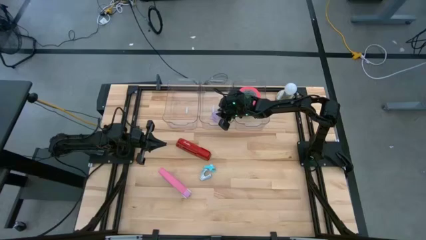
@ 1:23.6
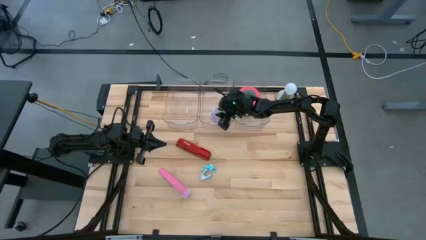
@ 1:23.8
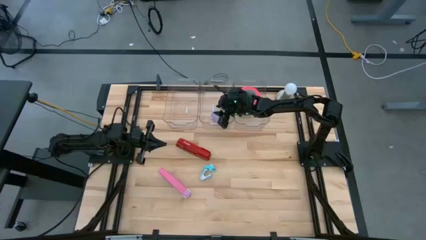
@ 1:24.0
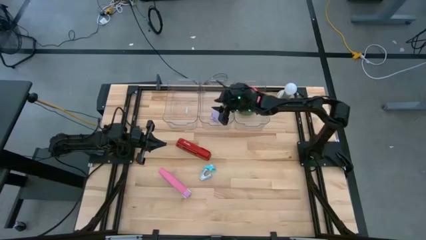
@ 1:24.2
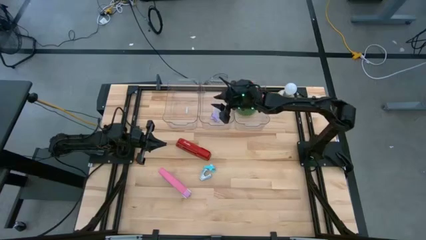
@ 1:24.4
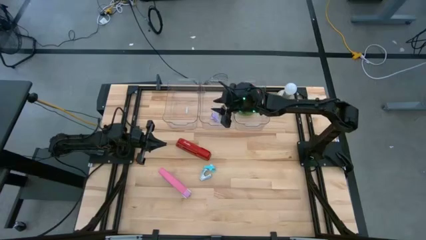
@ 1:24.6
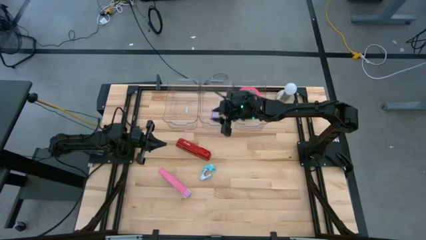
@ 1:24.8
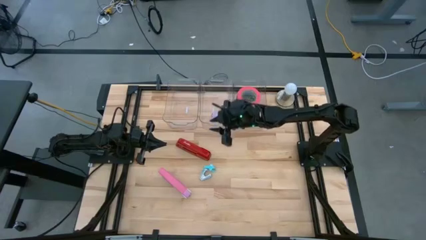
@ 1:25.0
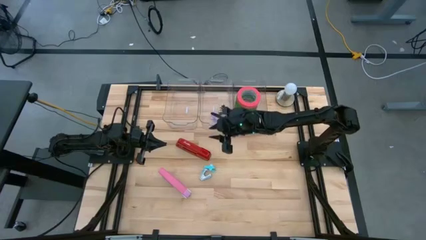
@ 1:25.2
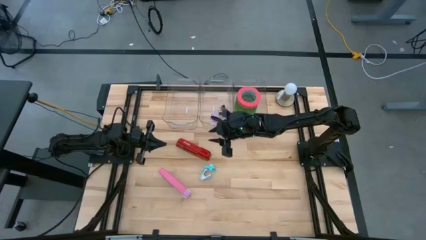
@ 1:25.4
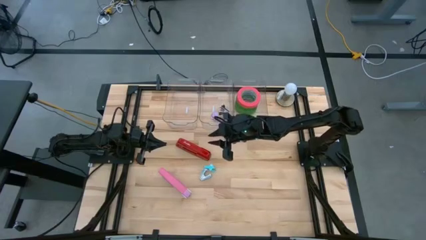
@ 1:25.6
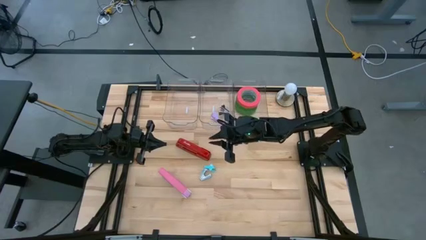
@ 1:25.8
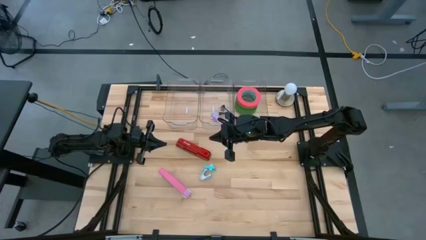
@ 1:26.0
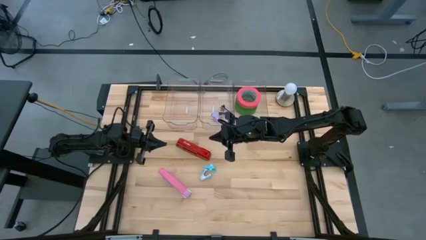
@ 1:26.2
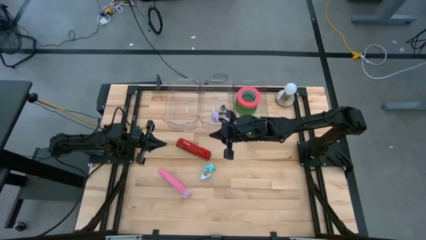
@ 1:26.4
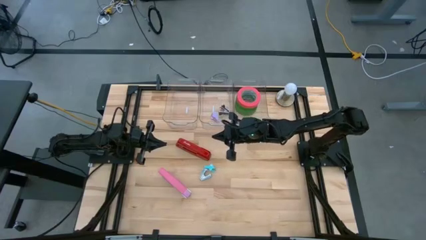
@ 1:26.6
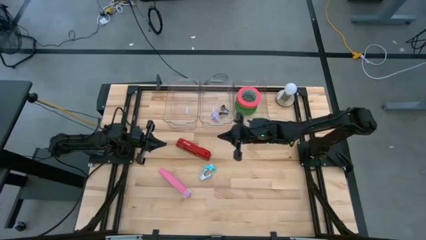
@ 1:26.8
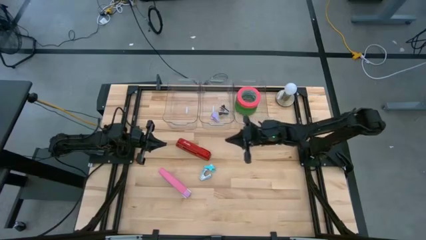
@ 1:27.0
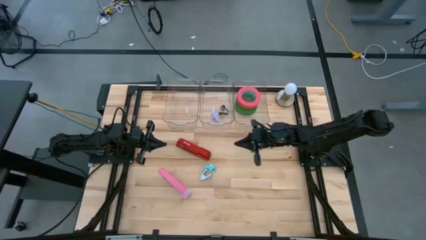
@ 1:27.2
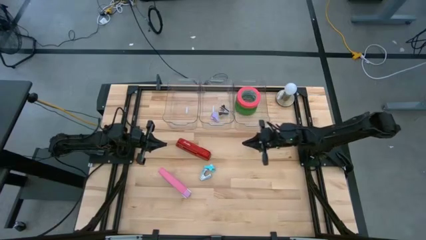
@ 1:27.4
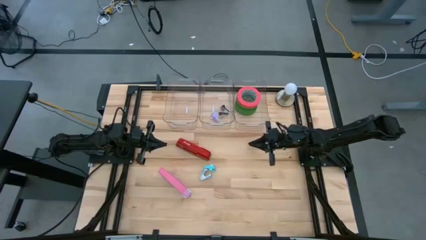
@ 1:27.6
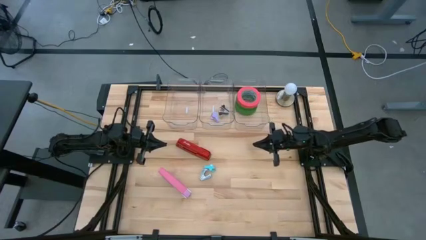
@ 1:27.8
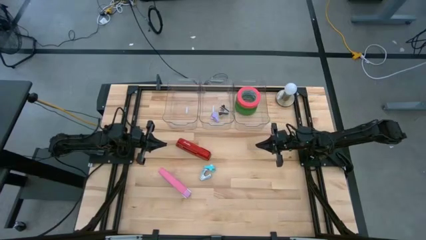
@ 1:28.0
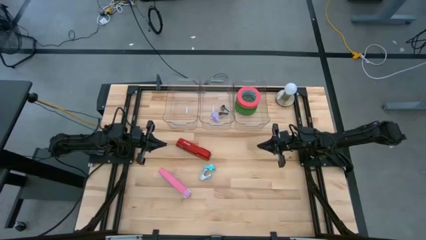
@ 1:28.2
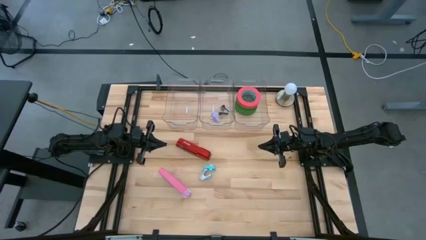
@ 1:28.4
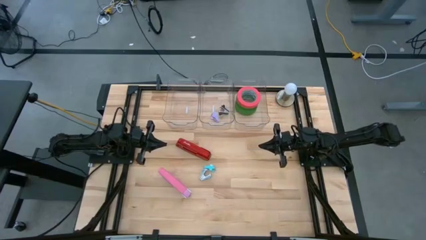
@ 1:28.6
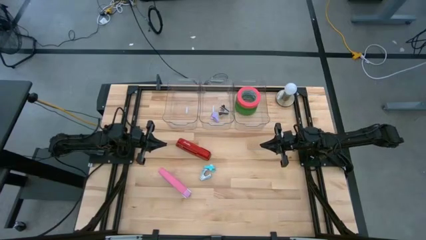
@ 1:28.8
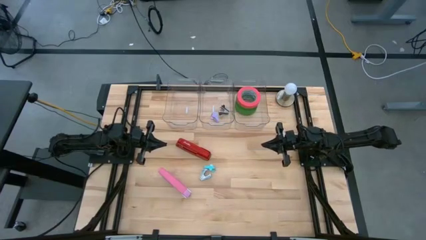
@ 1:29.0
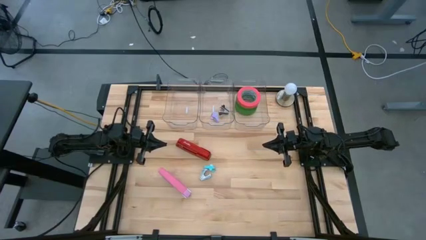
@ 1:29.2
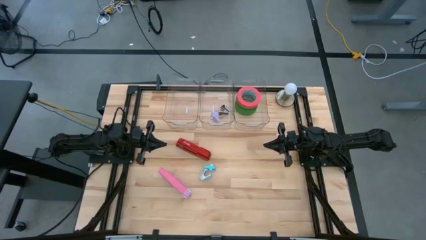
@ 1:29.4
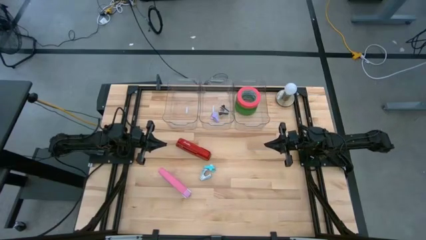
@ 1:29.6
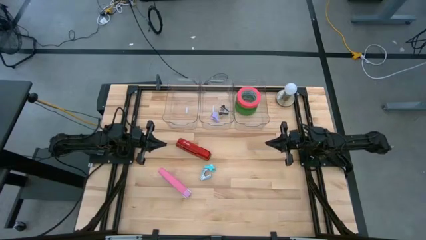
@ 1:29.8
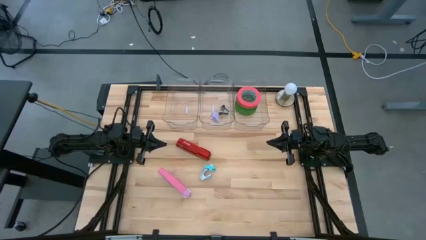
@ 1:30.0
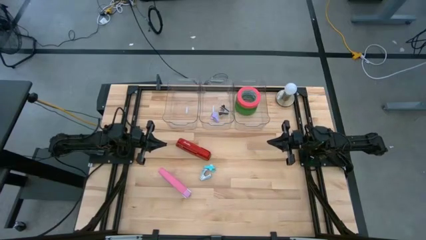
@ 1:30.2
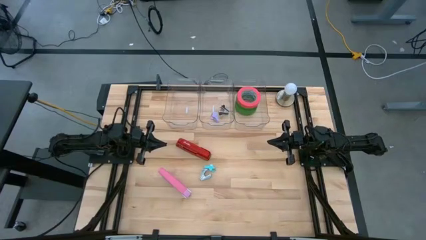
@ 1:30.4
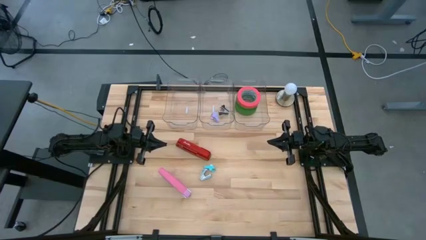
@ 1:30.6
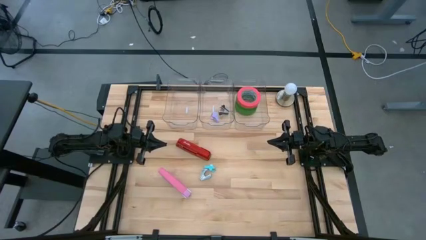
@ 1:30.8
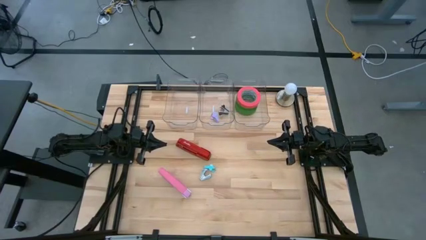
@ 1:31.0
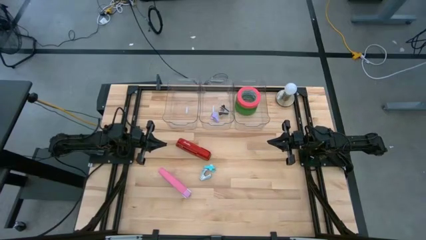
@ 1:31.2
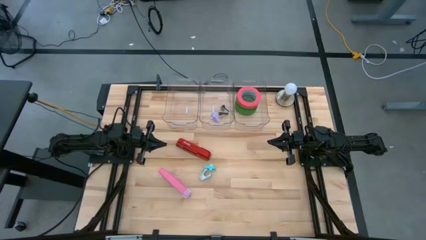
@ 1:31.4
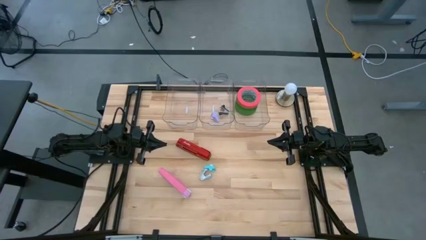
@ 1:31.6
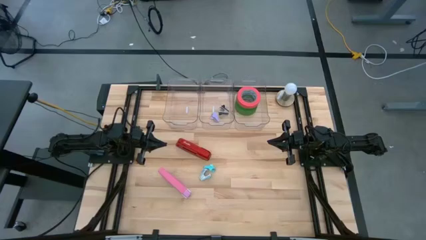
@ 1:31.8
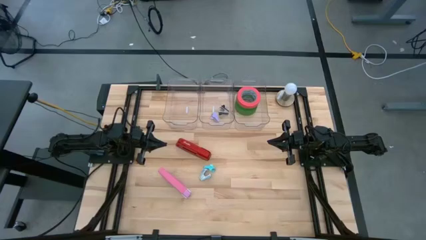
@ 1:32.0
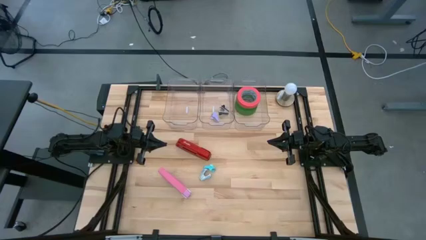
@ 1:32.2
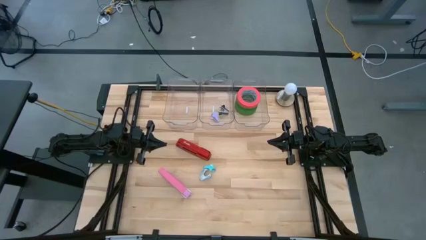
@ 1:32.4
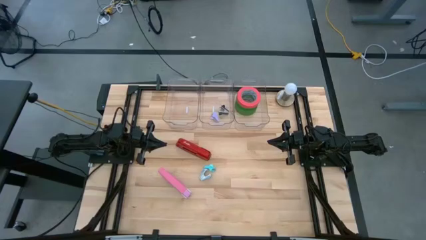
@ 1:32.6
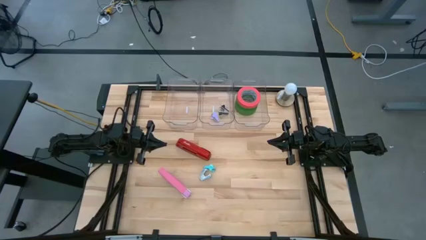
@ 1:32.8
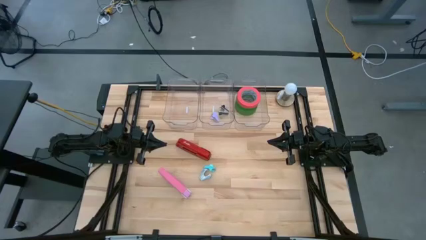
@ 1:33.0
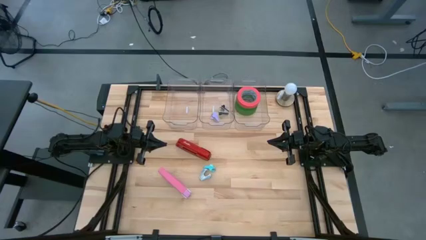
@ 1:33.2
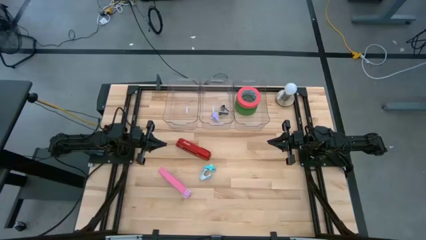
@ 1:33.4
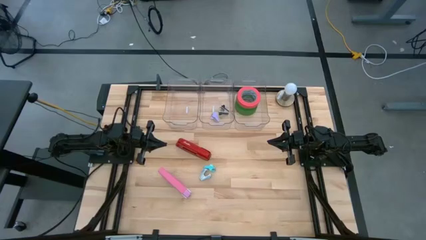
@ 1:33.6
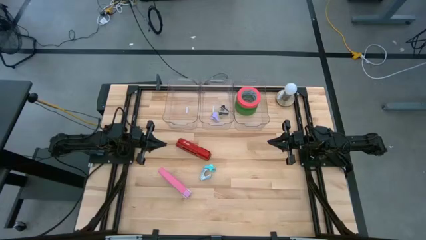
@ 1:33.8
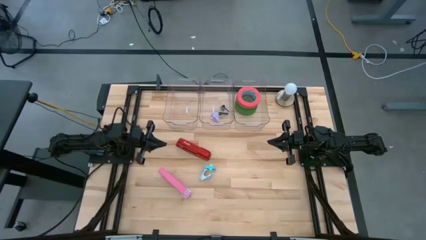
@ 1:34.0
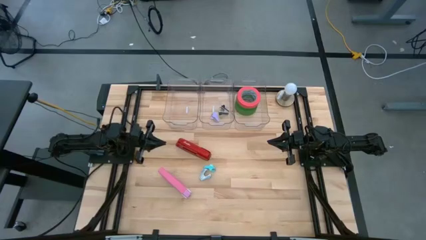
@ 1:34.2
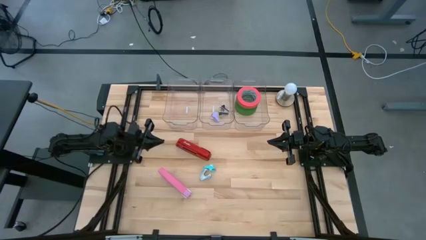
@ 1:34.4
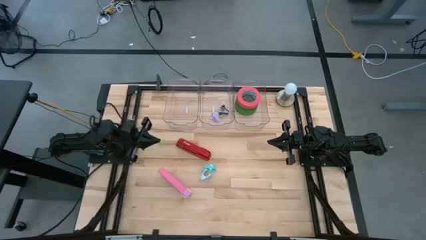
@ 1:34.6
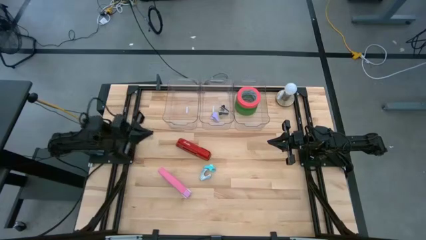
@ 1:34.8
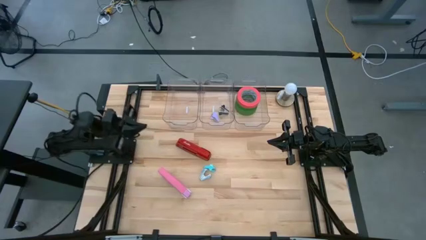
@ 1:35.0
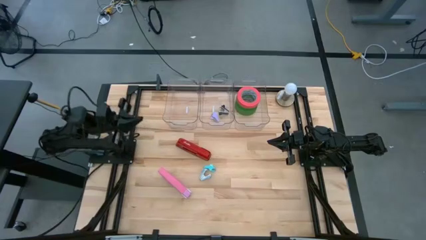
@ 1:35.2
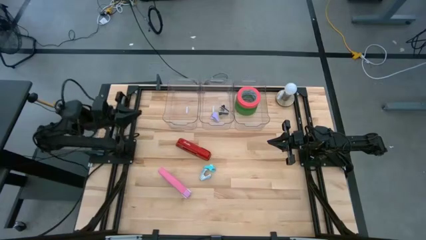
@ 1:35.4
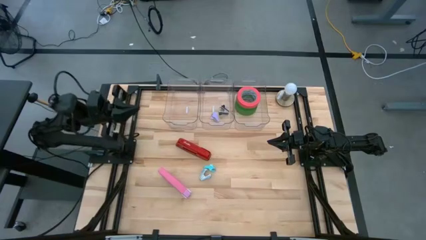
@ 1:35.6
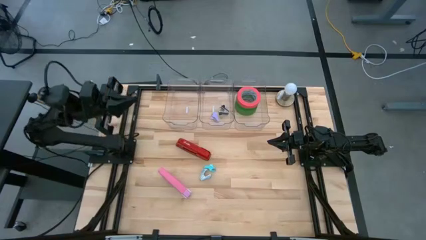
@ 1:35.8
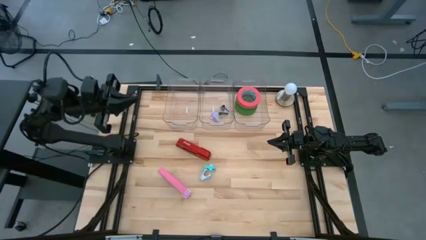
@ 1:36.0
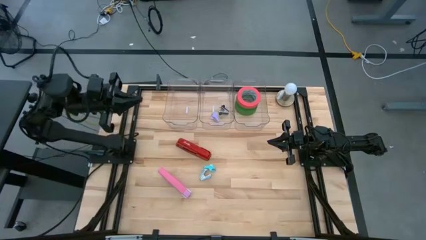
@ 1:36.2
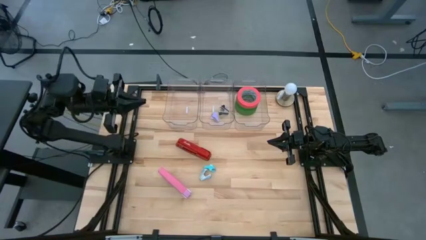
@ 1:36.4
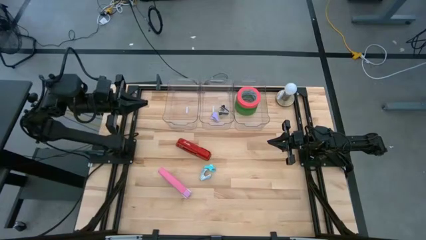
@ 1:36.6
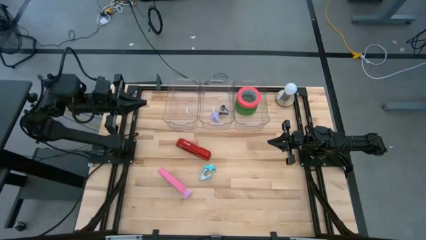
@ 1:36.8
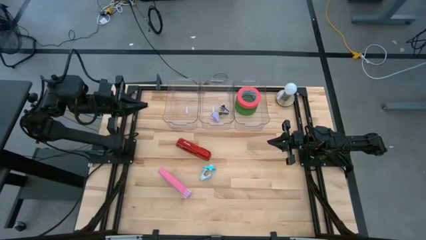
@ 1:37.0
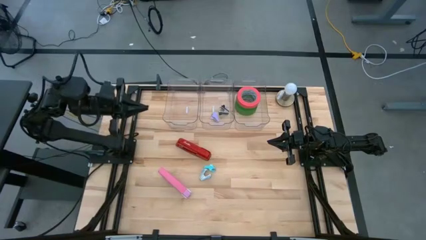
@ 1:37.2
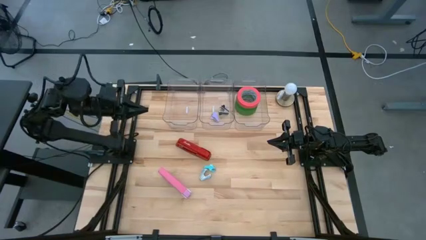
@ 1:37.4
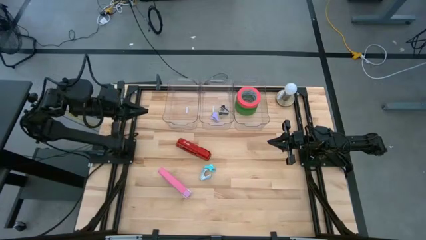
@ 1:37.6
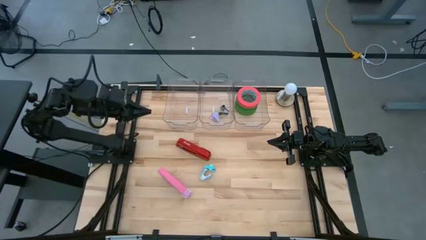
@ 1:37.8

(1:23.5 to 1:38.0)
Task: Pick and place Stapler, Stapler remover, tape
Put the pink stapler into the left transparent bin

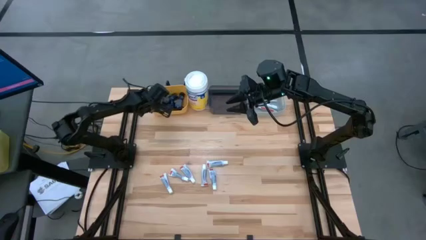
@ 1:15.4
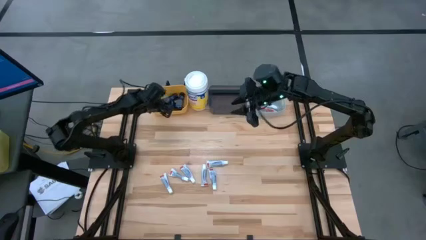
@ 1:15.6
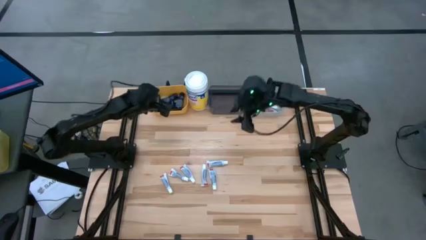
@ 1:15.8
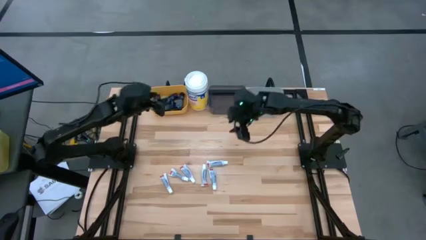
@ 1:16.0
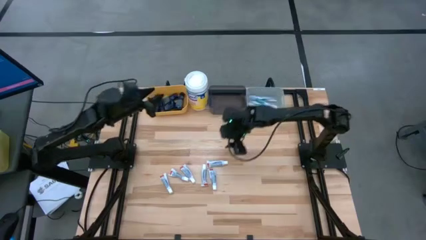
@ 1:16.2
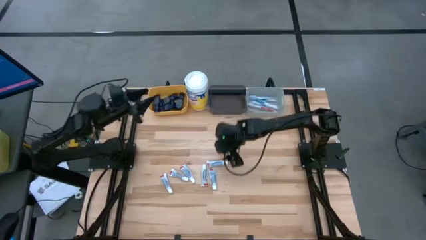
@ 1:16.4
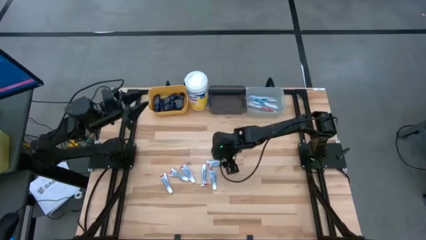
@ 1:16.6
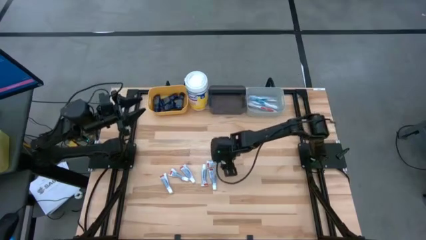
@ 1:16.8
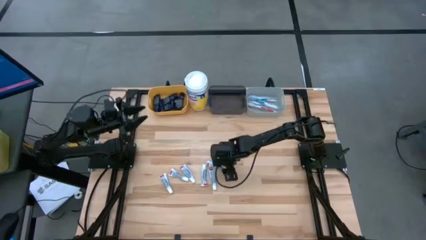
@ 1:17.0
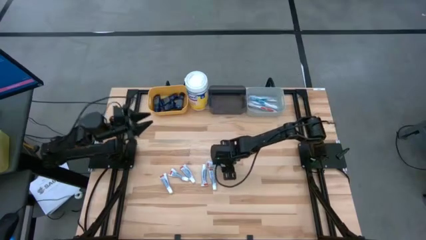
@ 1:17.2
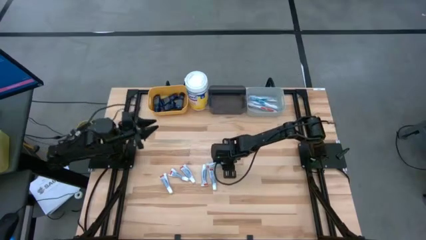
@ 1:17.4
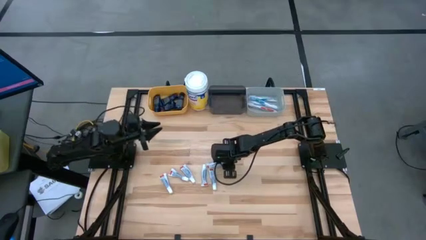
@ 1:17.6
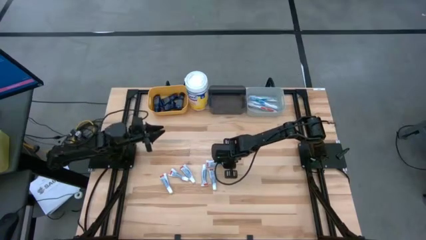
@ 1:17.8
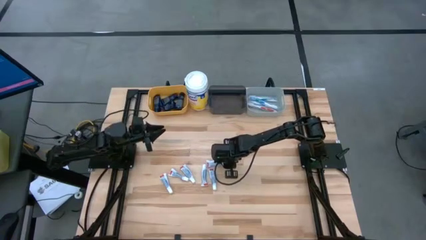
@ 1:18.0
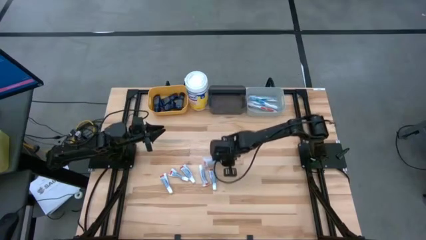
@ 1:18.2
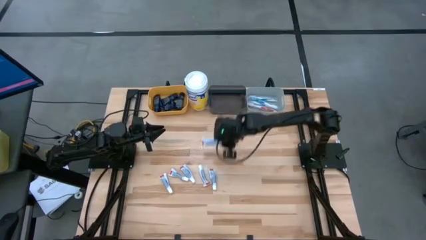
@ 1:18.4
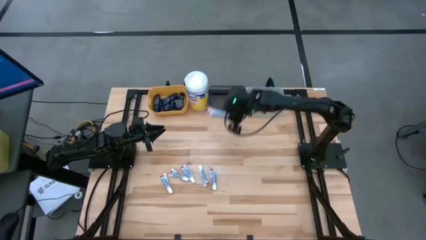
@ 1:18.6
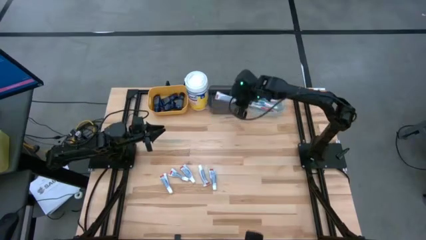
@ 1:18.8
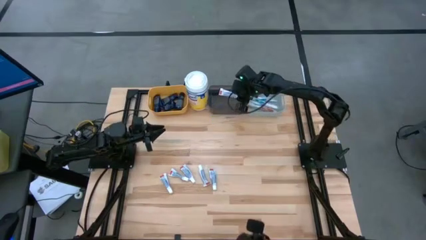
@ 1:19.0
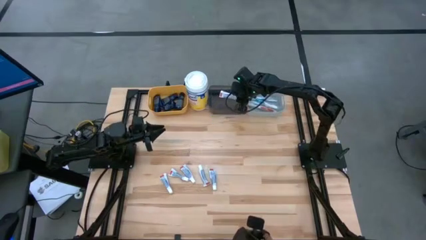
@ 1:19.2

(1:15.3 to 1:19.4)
Task: Pick & Place Travel size toiletries
Put the white toothpaste into the black bin
